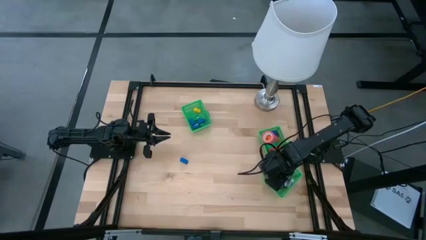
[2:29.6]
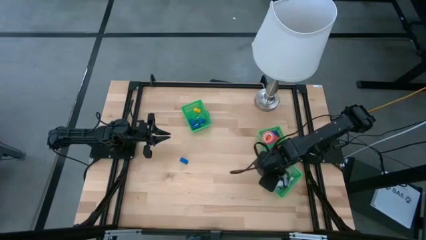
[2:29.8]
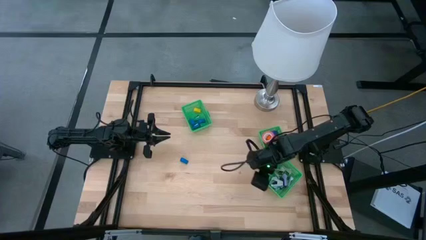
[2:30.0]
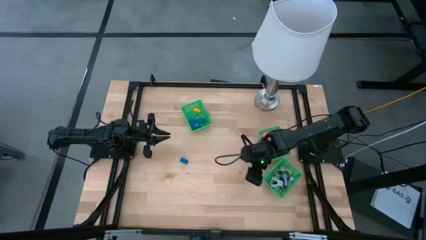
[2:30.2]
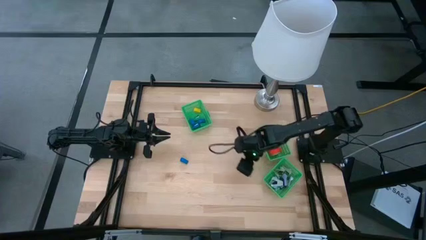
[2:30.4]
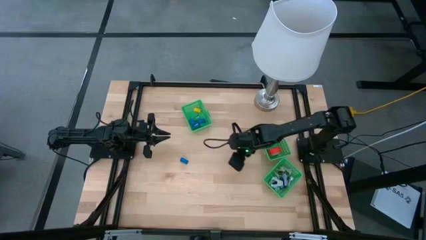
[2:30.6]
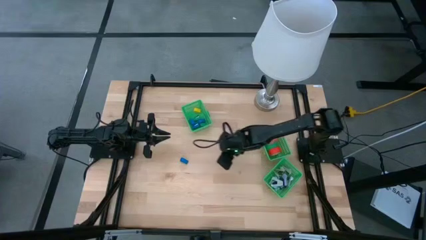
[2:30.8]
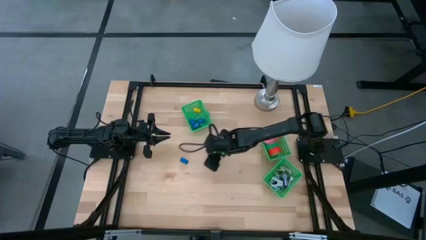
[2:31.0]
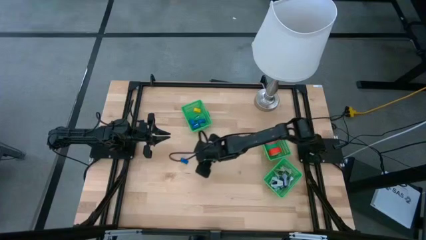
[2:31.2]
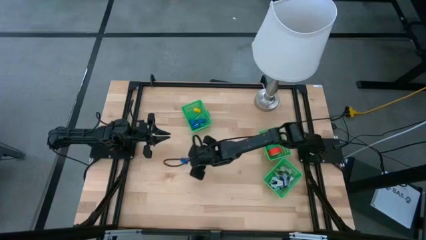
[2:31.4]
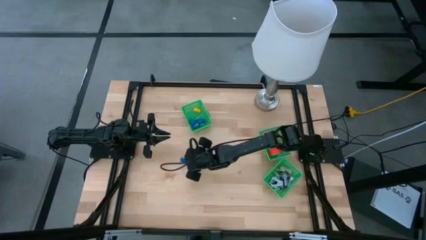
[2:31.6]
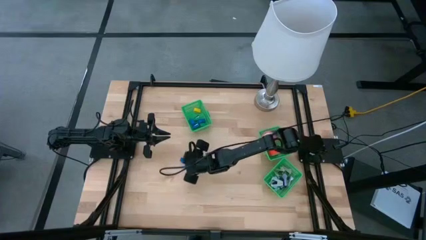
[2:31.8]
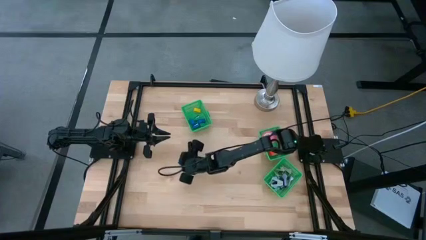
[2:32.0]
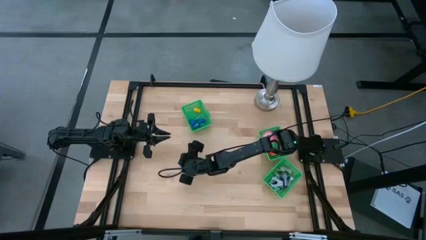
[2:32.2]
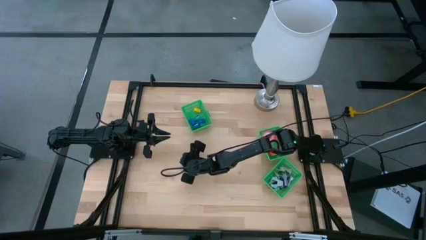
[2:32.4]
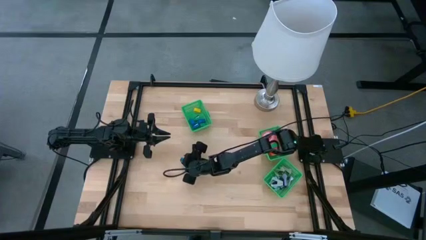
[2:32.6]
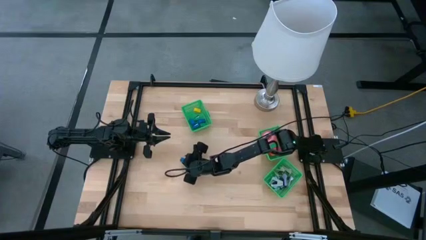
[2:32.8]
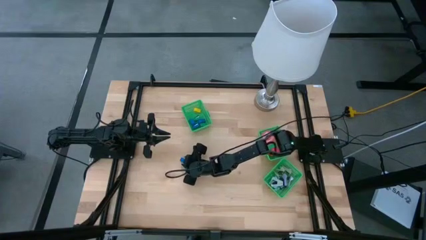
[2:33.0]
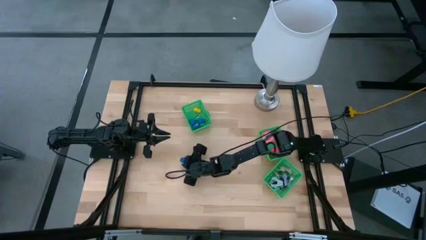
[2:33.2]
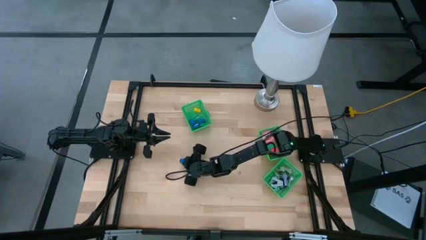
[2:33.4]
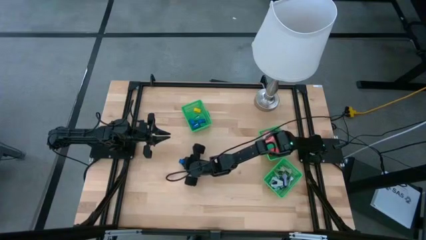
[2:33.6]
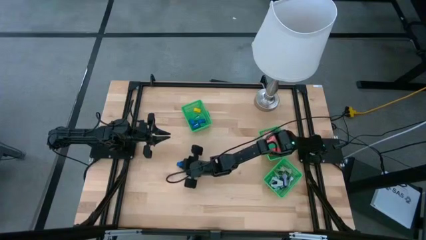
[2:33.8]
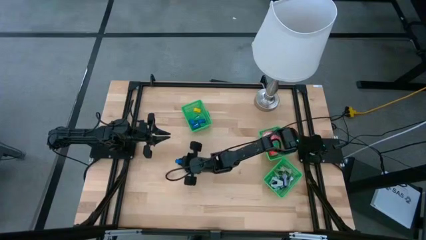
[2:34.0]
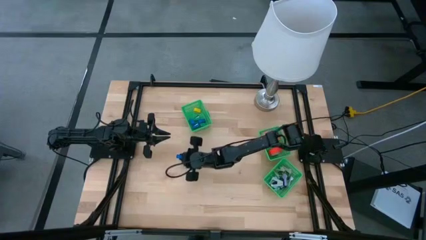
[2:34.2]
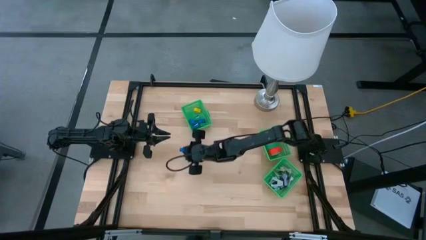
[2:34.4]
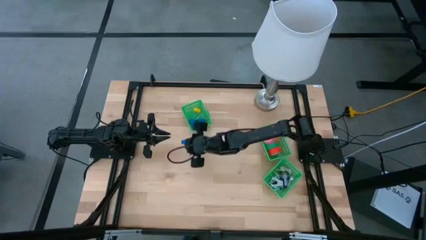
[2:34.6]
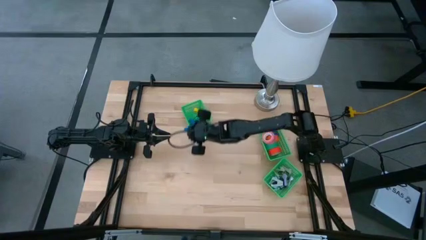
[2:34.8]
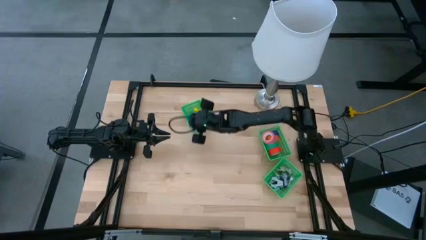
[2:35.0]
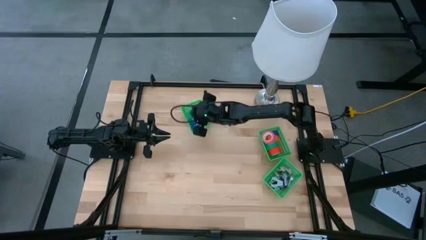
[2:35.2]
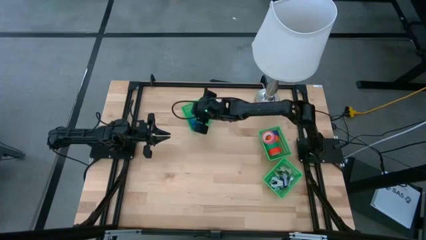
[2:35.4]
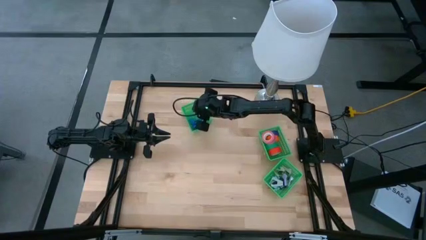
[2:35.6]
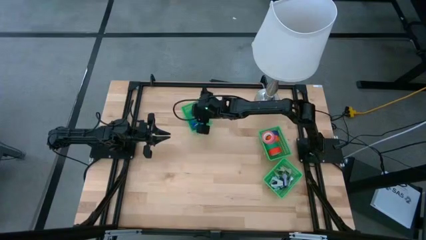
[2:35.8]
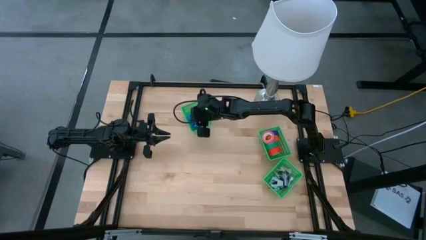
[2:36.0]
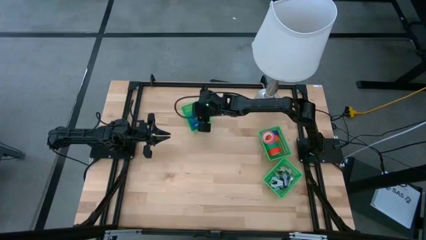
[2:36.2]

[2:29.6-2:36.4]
Task: Pick and place Stapler, Stapler remover, tape
Put the blue stapler into the top left green bin

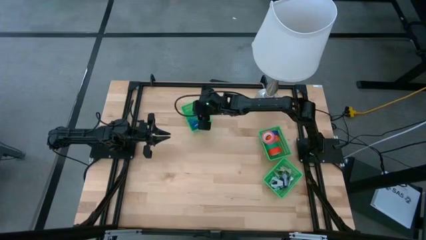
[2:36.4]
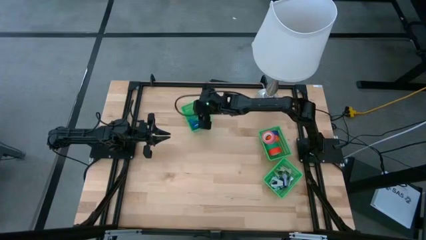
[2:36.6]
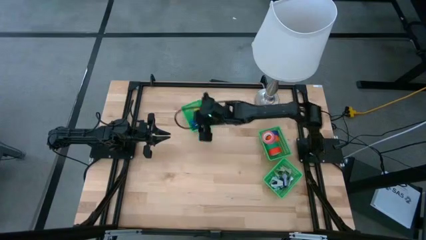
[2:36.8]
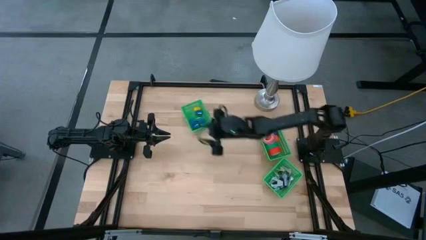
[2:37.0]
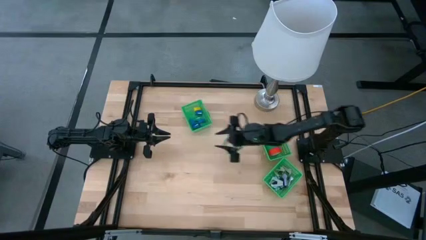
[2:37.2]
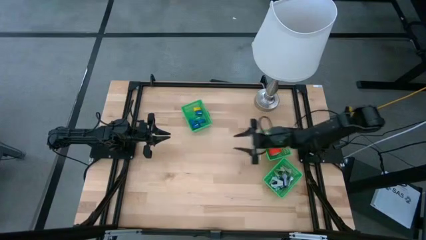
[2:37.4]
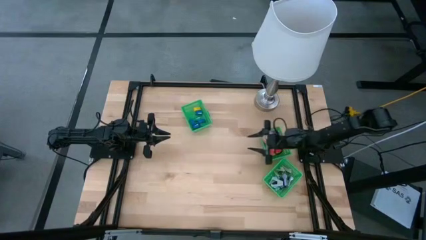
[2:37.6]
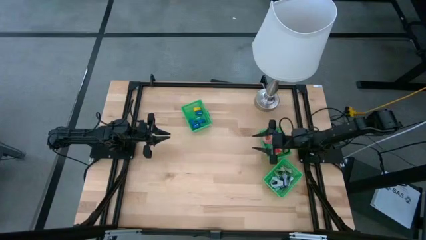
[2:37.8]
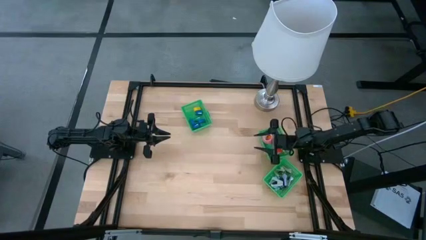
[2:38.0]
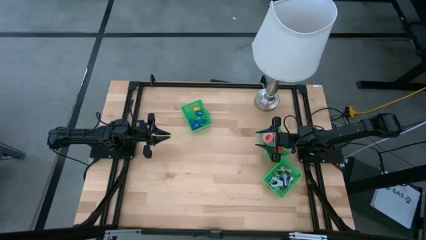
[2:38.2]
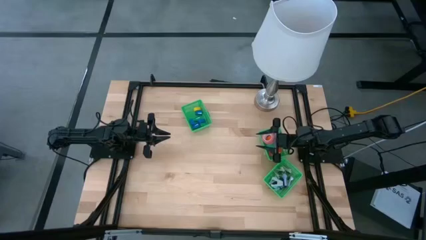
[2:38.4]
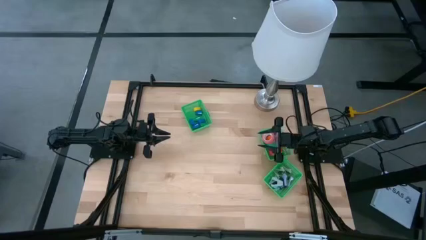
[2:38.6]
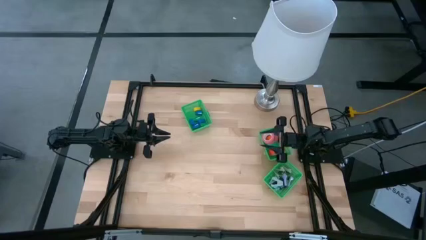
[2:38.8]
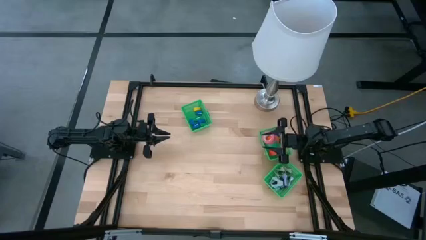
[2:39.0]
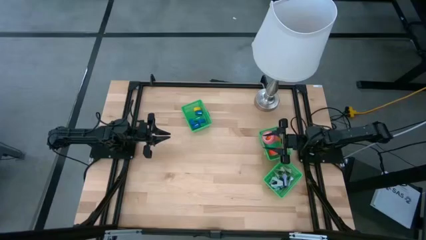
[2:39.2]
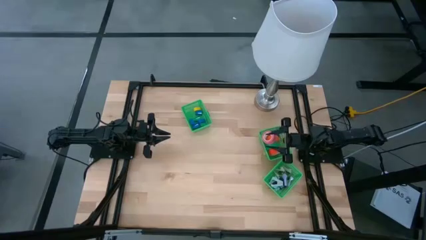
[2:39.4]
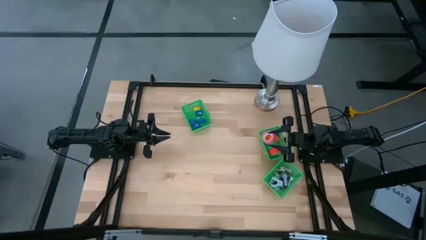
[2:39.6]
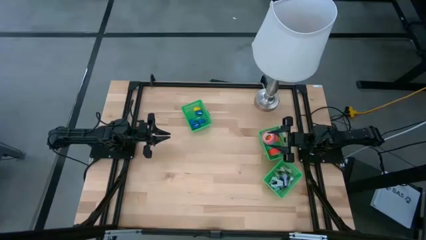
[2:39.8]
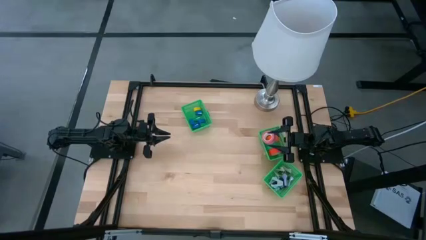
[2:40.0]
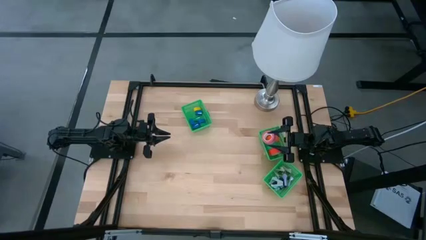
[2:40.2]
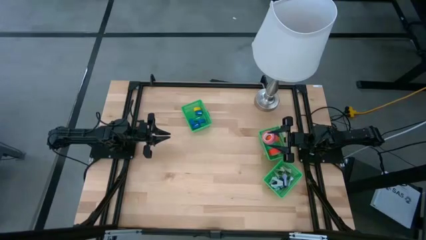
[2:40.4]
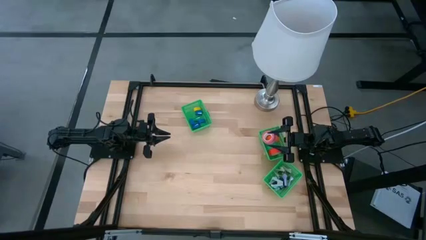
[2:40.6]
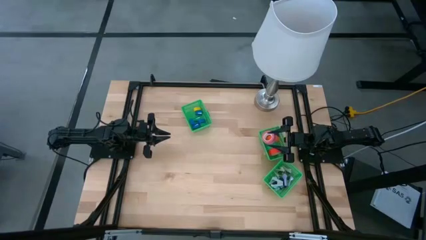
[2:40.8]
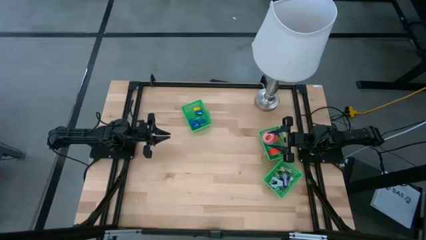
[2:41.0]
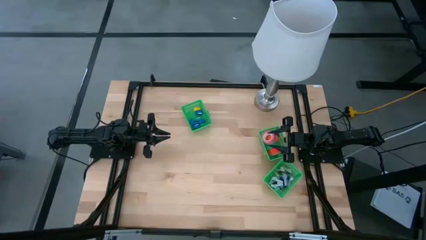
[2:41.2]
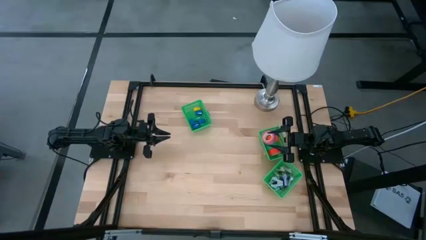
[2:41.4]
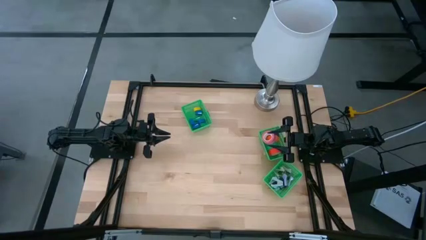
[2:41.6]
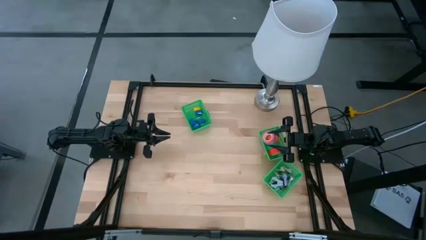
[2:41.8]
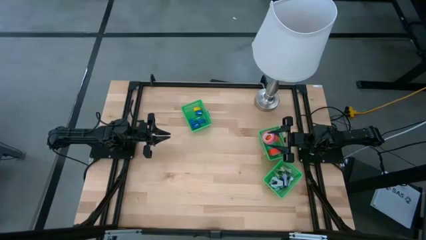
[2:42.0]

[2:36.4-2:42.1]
Return to Home Position

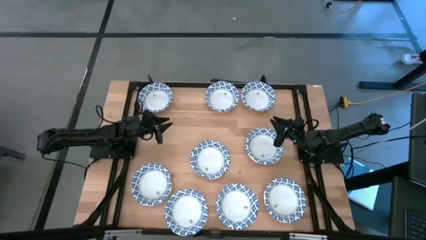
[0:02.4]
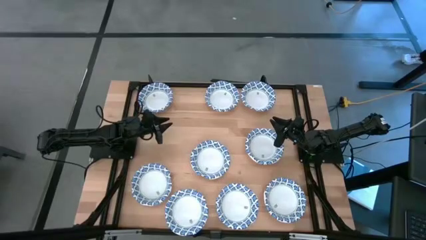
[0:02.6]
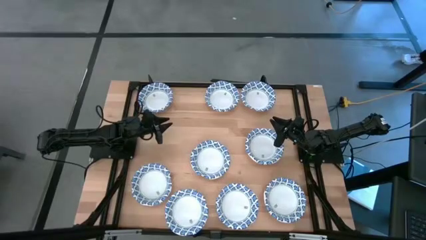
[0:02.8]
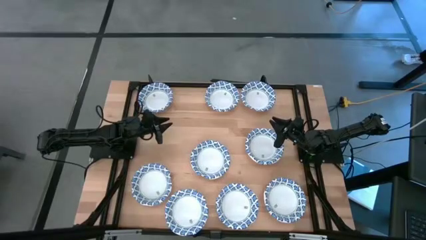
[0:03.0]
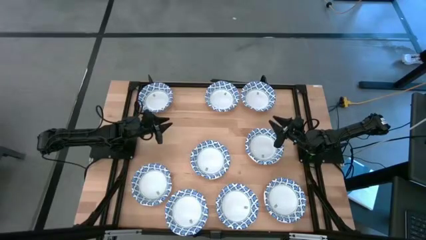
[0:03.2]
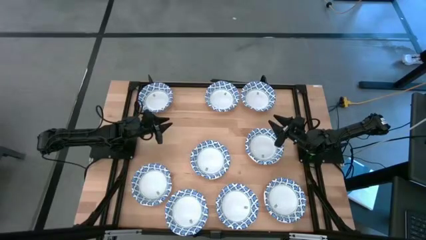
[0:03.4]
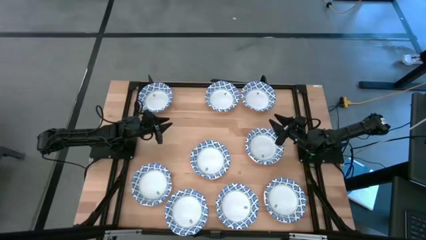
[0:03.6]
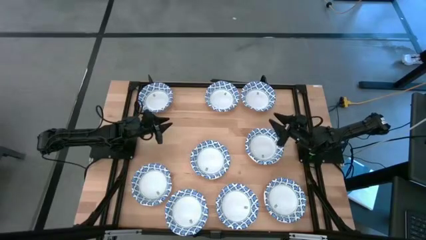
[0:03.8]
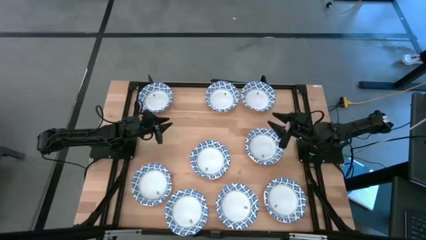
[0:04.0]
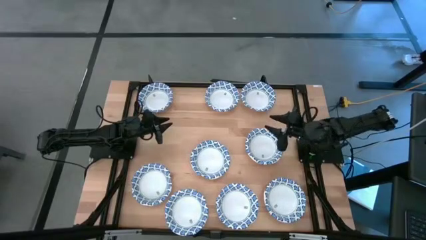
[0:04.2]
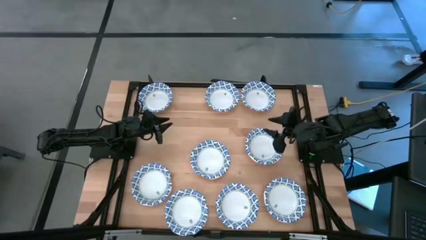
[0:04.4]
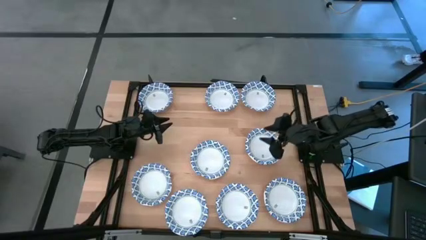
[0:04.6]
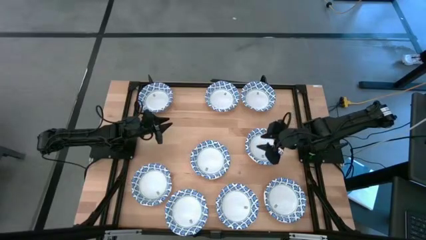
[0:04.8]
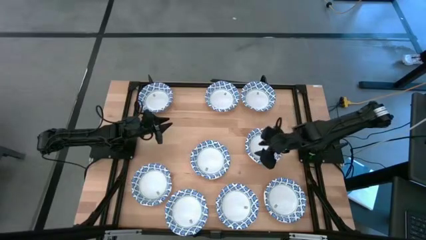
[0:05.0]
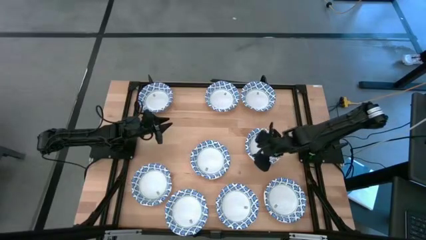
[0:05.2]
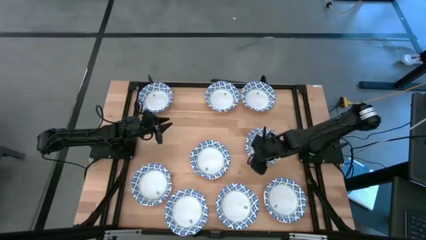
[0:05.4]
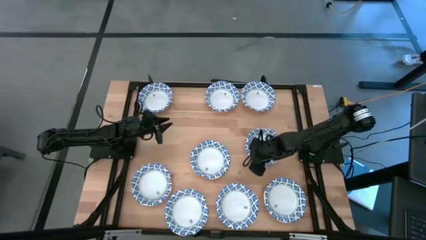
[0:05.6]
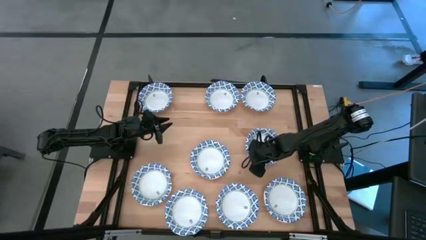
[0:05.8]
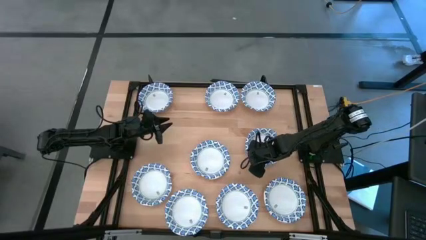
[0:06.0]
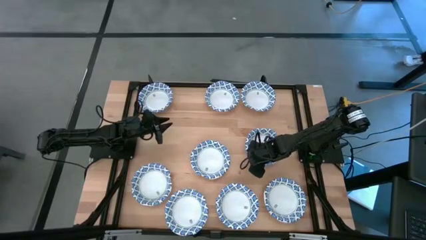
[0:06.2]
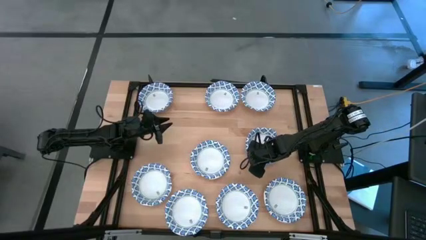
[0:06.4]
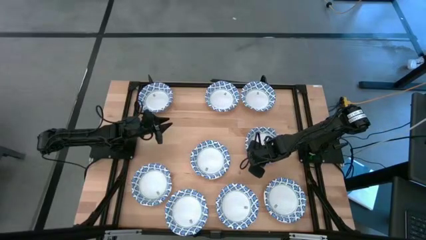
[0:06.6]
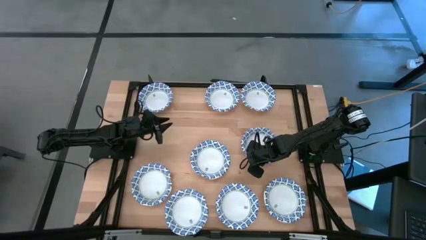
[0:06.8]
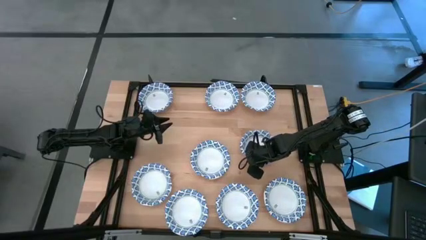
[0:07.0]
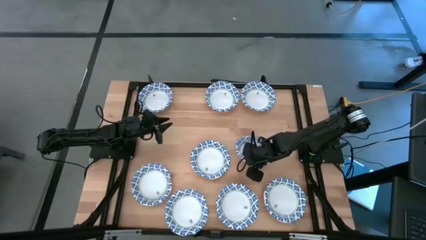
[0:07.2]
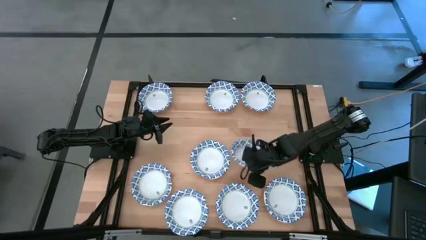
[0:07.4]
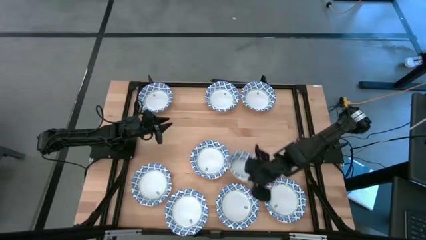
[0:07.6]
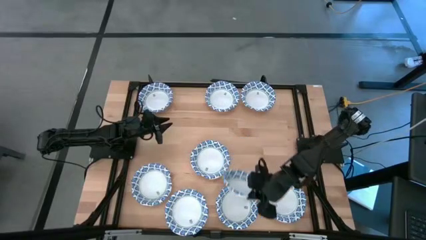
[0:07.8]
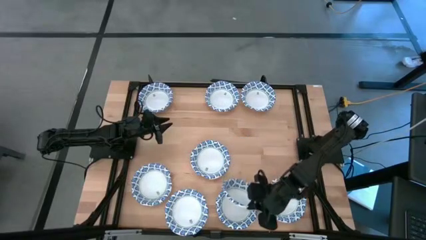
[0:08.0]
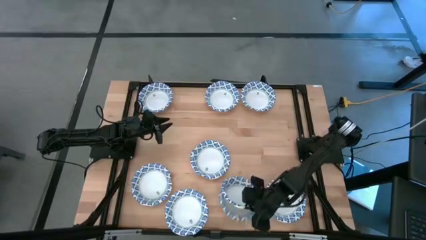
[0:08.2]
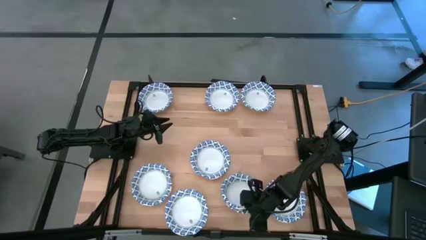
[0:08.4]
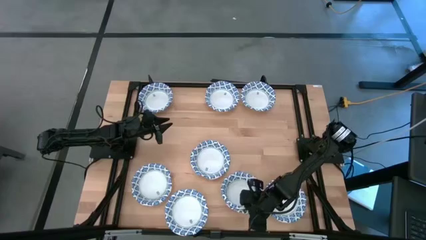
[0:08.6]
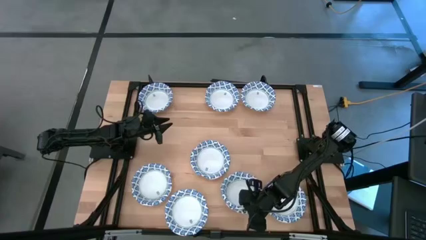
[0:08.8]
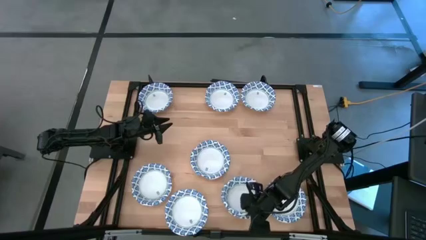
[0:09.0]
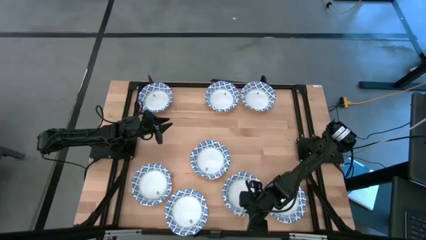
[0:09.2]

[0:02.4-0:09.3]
Task: Nest bowls inside each other
Stack the blue patterned bowl on the blue patterned bowl
